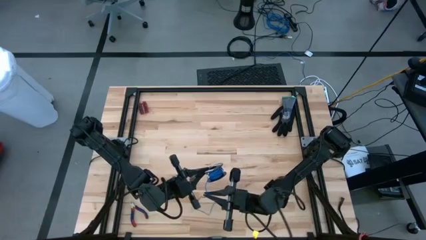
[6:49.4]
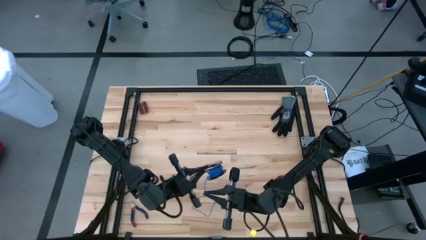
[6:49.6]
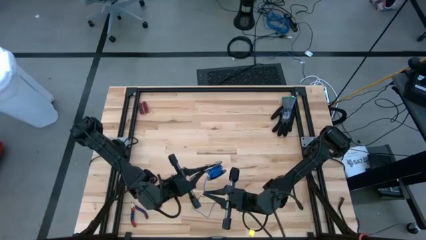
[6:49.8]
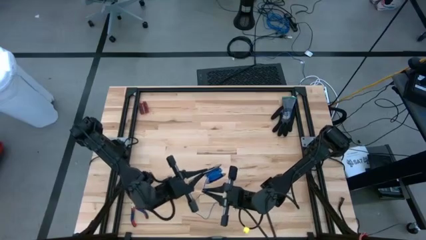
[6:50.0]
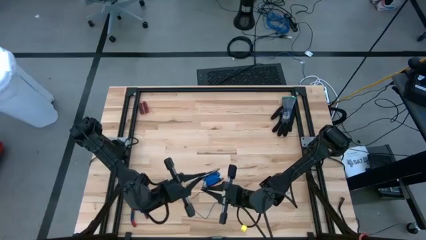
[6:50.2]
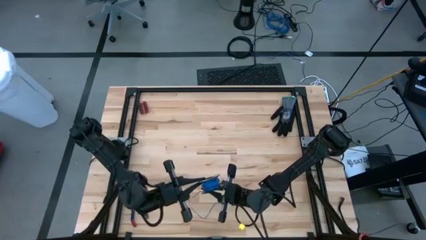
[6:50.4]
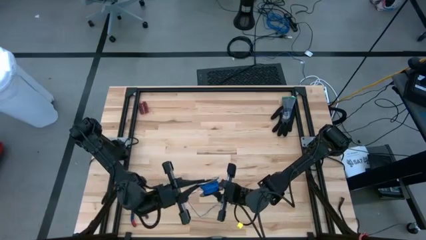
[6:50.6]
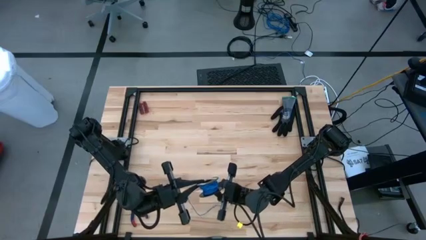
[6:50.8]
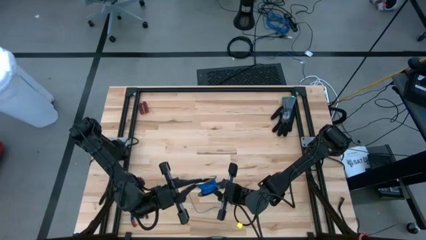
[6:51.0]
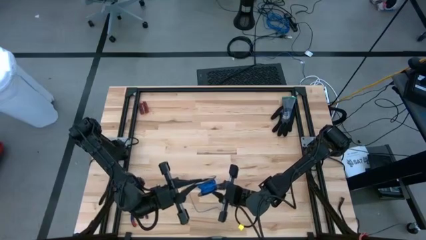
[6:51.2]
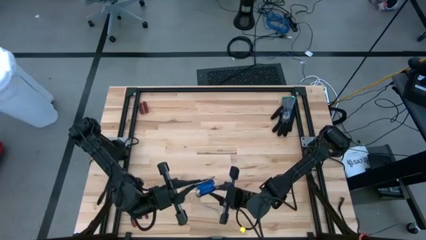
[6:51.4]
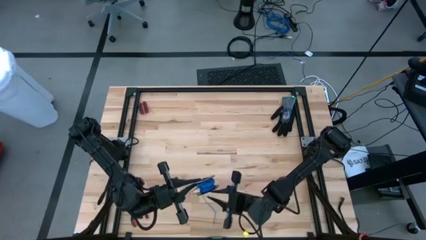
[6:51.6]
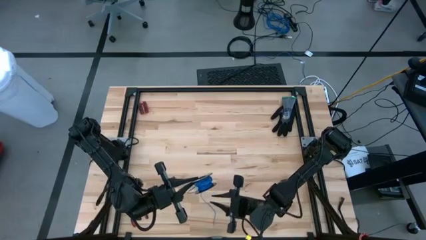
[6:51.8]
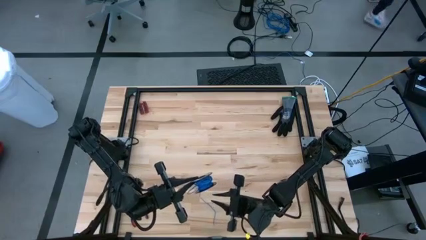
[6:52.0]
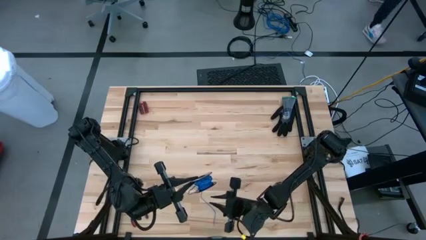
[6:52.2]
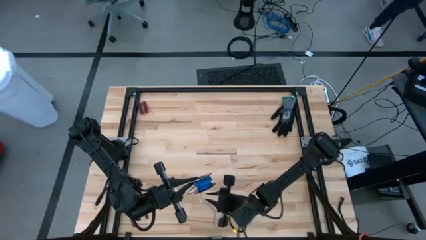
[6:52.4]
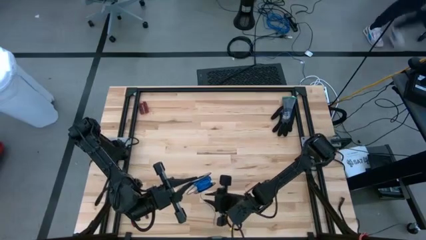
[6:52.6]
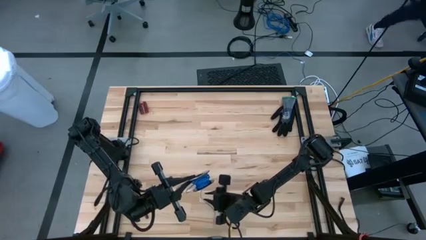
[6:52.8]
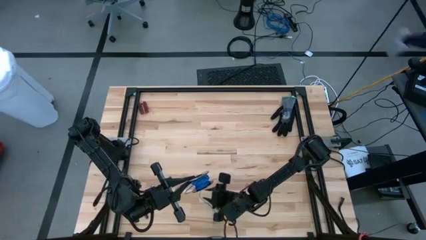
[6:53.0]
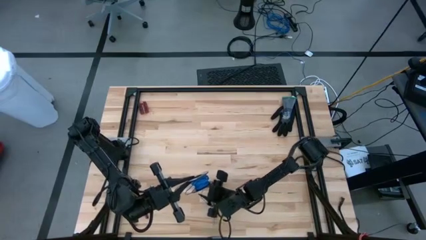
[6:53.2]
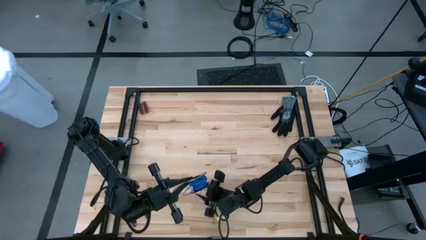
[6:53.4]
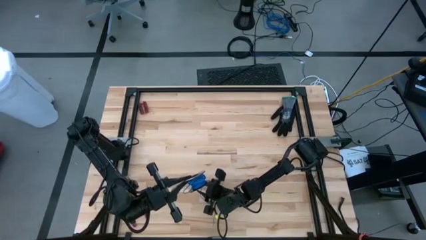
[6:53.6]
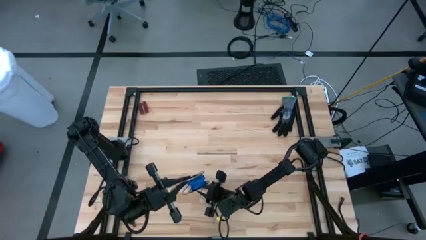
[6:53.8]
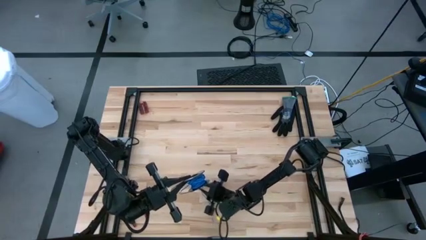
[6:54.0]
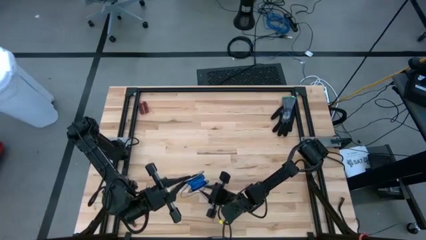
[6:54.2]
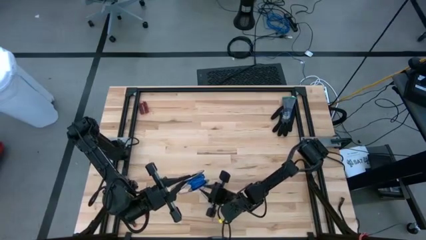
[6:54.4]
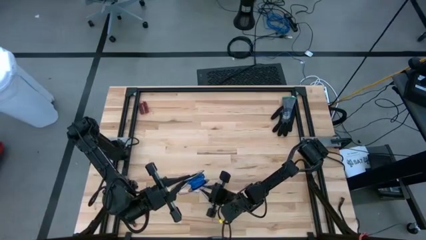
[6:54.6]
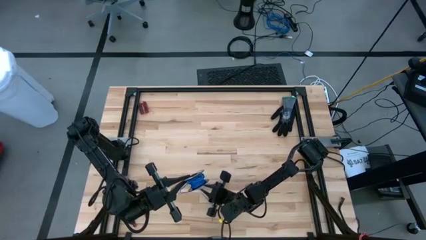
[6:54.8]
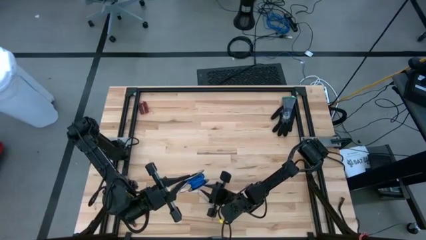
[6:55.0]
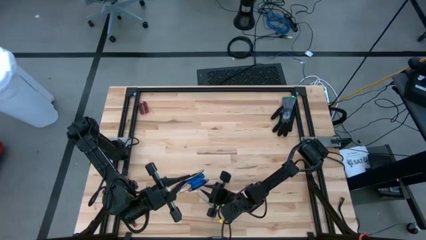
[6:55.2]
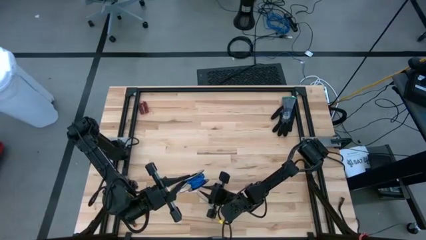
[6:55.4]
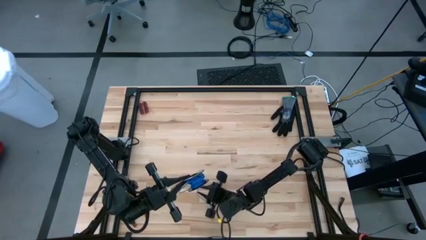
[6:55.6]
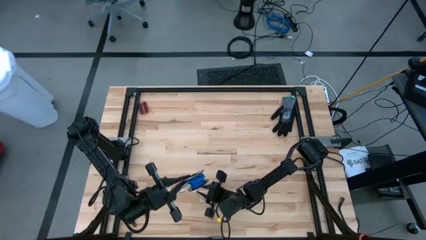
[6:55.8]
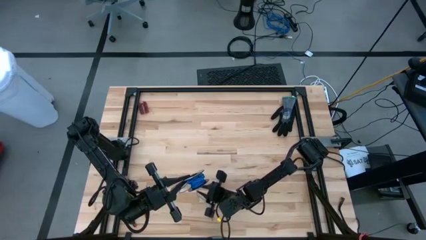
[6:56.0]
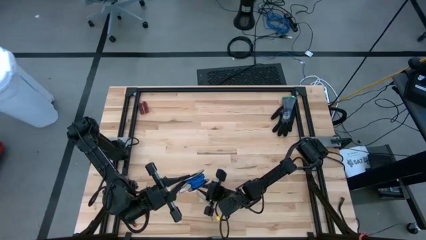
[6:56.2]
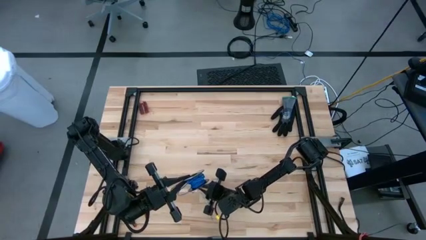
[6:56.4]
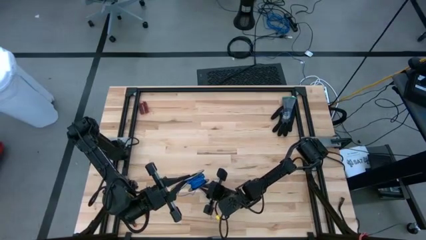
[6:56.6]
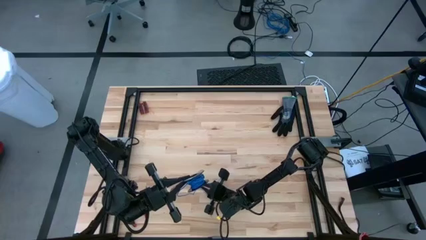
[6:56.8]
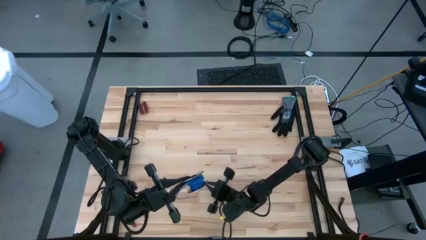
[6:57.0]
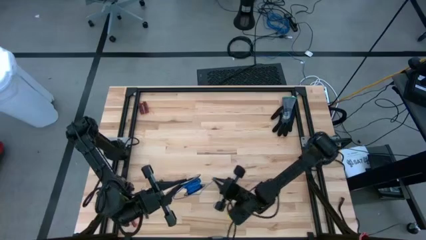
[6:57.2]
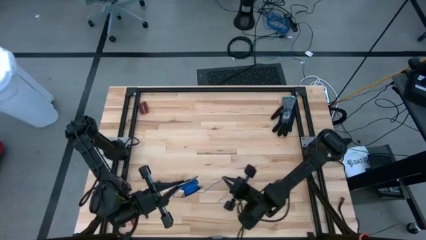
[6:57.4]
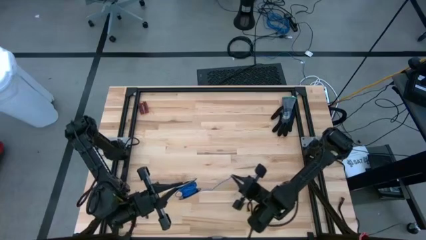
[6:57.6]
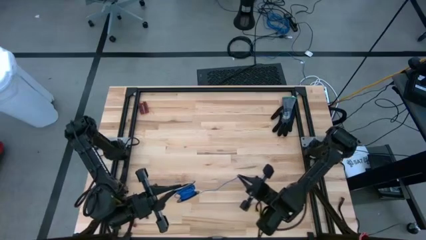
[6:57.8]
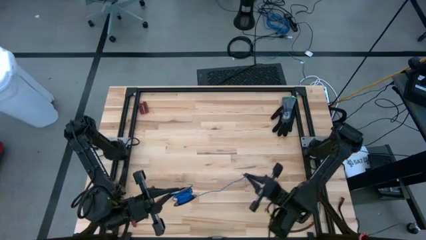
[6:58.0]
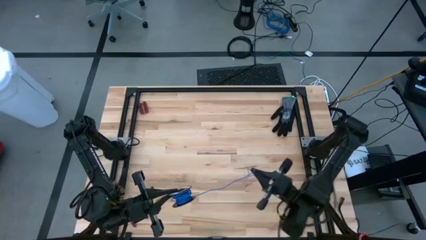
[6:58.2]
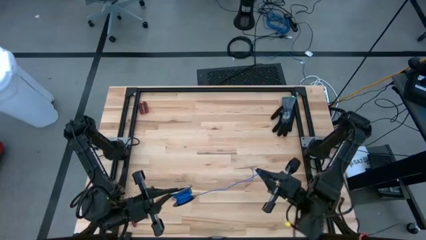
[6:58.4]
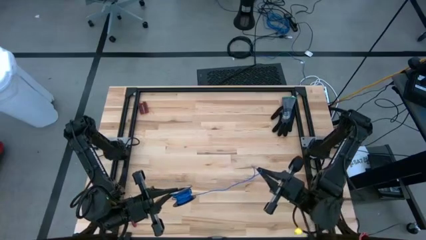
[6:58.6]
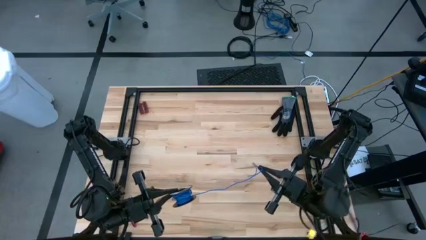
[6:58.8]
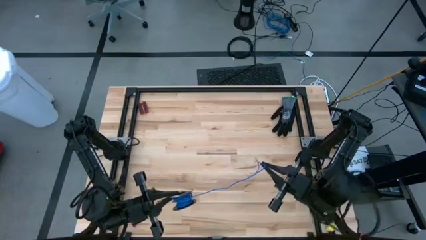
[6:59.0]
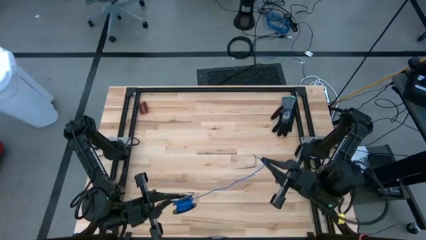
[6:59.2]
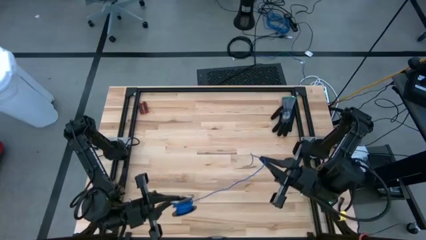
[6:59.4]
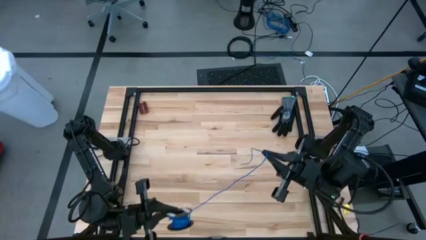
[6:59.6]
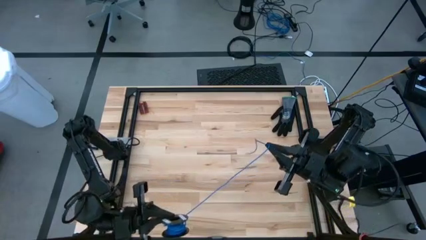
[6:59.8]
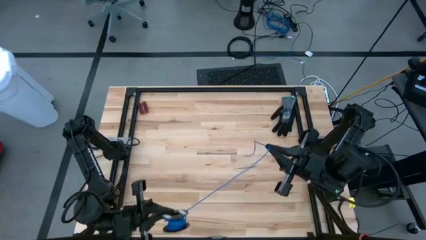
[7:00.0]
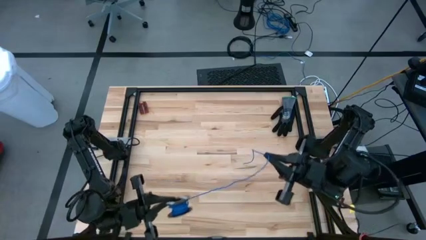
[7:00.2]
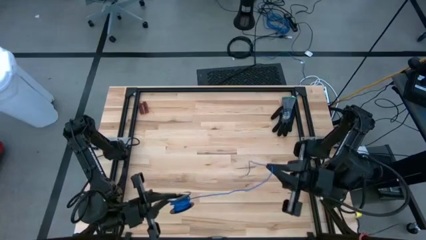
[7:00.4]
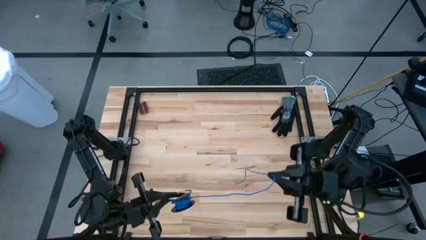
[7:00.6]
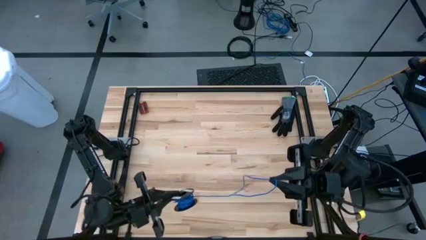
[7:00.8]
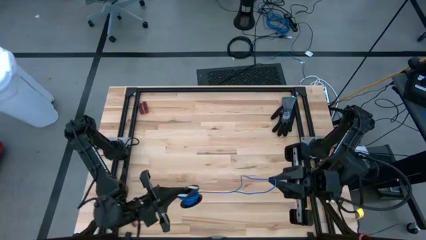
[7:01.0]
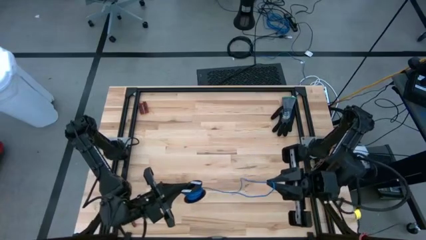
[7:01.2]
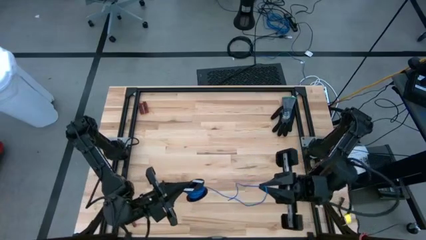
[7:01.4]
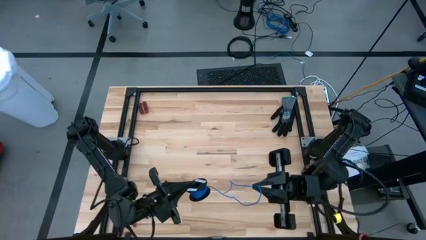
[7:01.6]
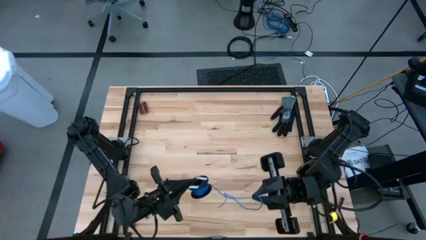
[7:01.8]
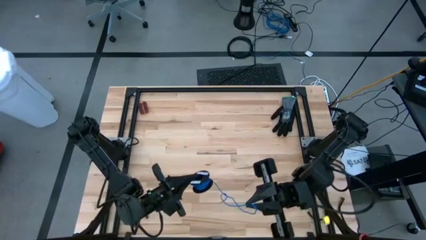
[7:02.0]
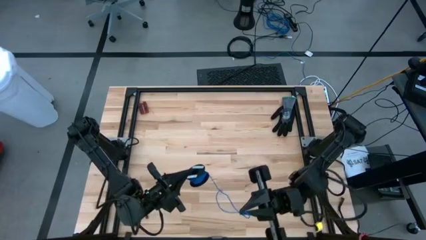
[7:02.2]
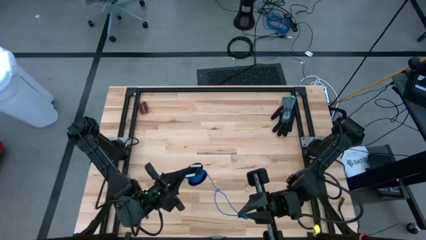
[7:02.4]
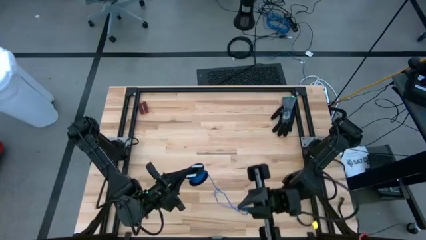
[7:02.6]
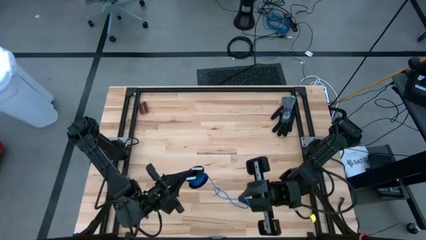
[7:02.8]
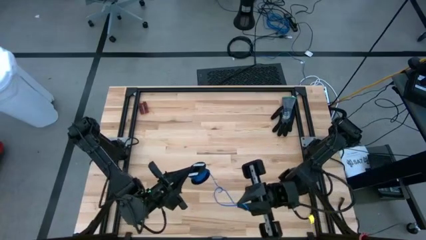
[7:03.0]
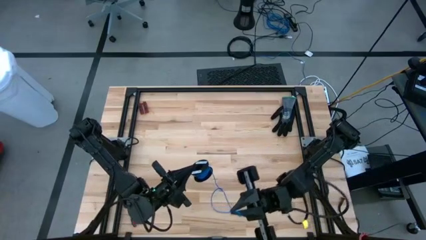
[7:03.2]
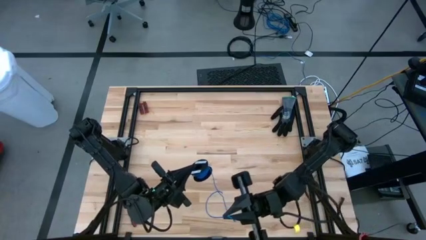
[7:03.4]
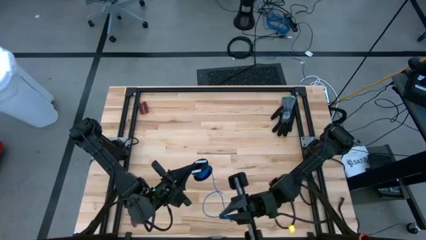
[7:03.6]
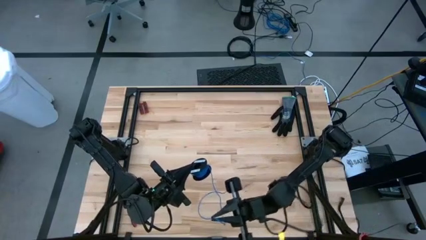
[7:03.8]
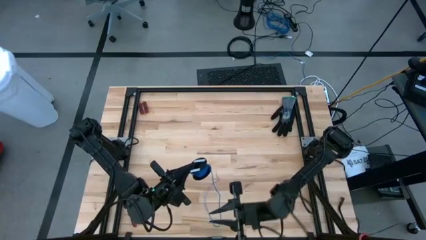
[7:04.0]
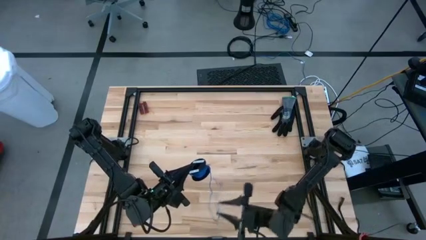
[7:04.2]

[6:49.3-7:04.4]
Task: Coil cords
Coil the blue wire onto a spool

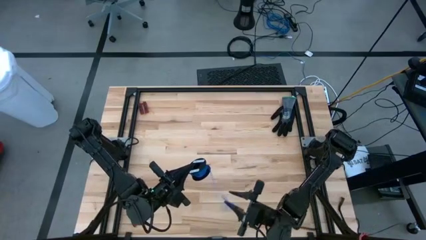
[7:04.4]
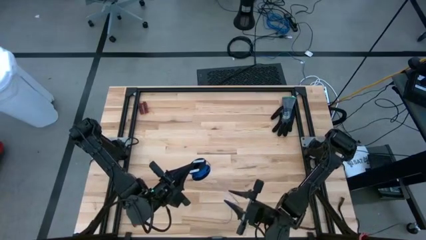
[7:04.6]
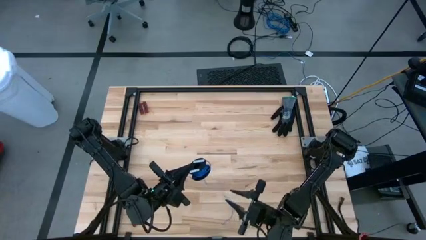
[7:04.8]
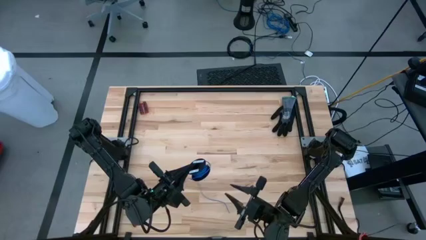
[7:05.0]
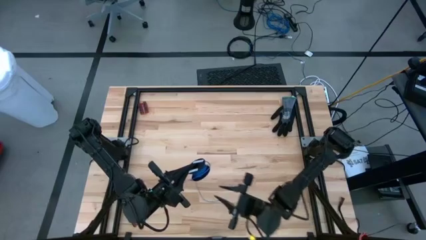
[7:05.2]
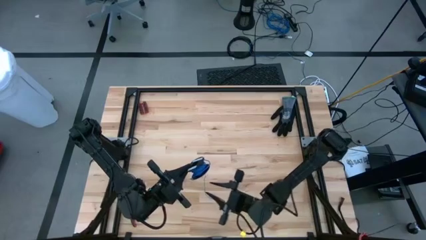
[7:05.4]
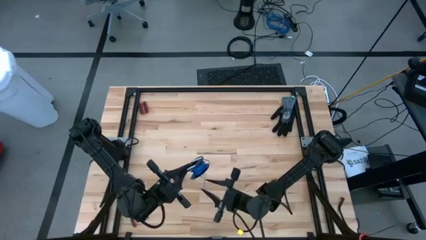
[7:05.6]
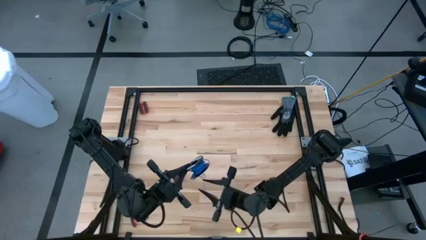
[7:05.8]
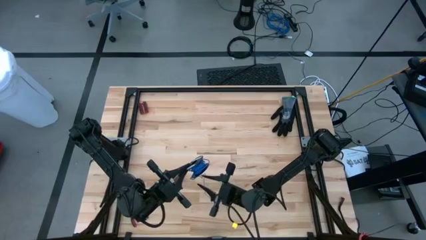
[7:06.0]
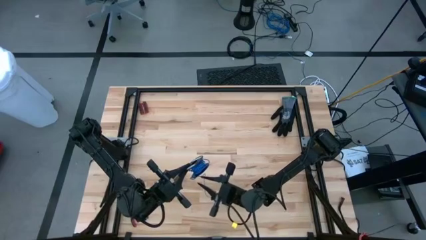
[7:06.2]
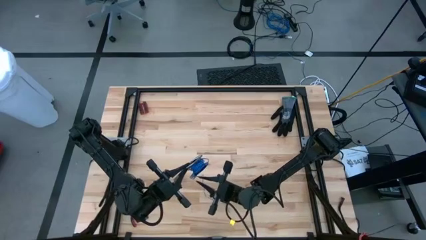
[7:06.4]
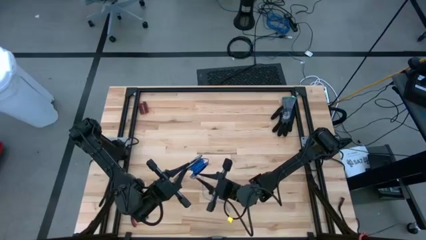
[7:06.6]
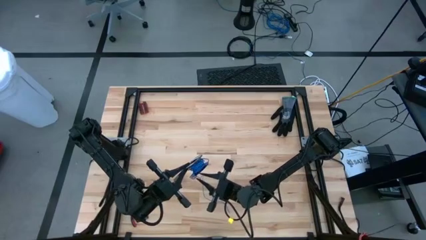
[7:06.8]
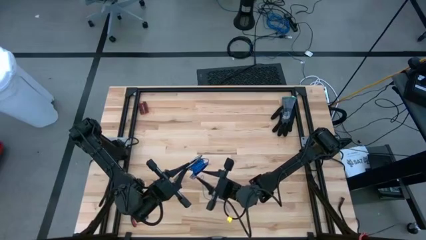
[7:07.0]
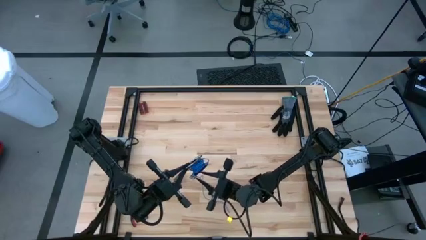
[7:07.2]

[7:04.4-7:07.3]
Coil the blue wire onto a spool
